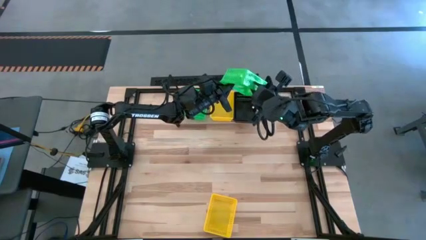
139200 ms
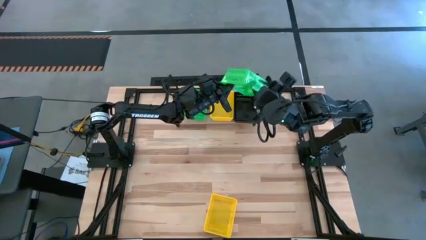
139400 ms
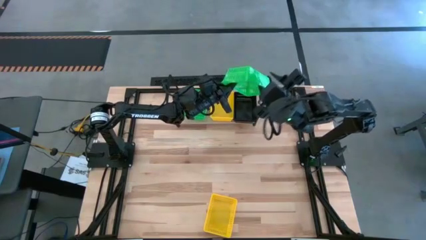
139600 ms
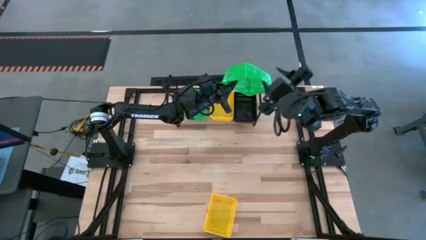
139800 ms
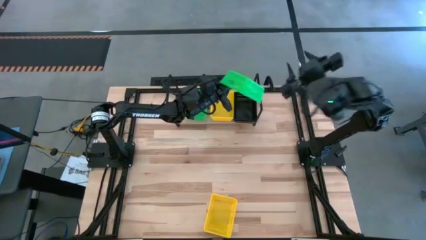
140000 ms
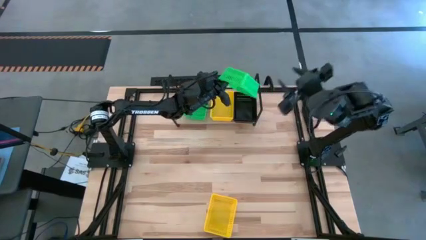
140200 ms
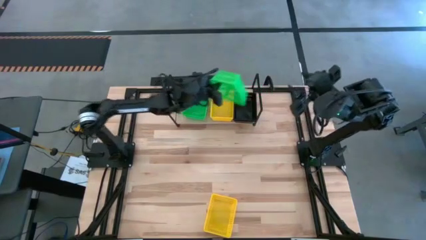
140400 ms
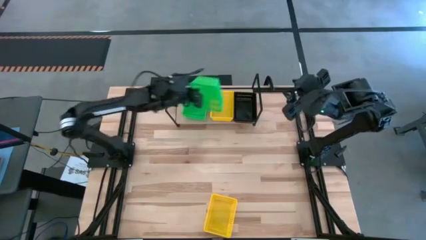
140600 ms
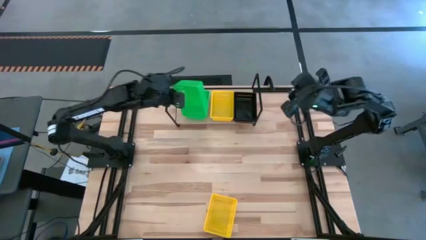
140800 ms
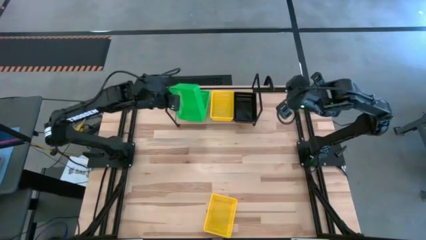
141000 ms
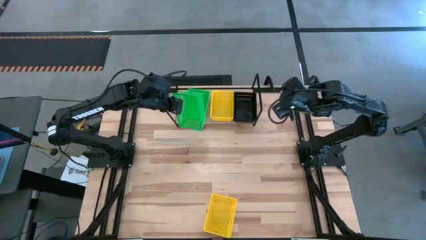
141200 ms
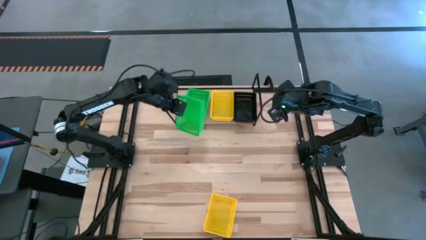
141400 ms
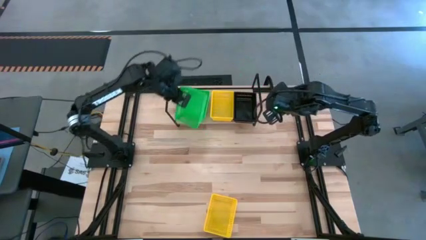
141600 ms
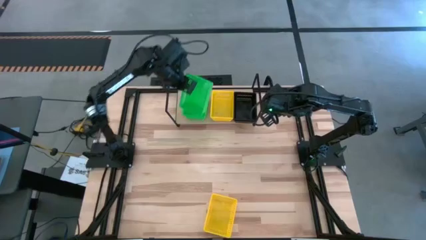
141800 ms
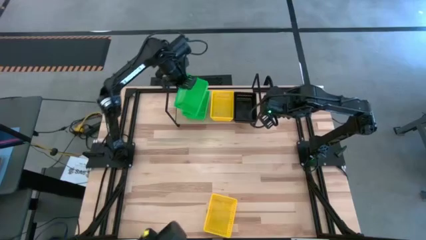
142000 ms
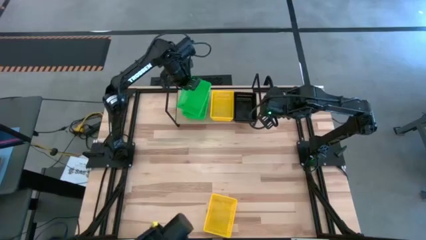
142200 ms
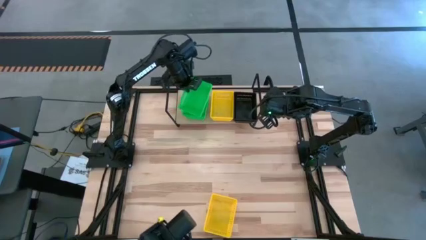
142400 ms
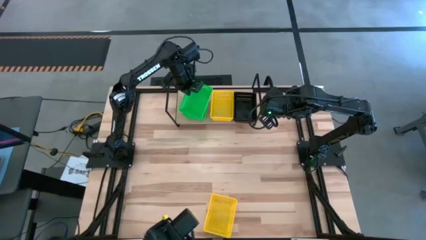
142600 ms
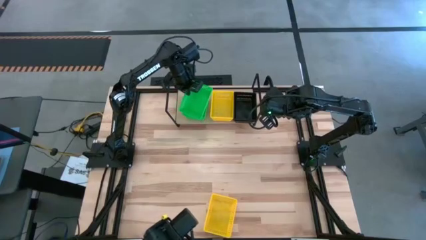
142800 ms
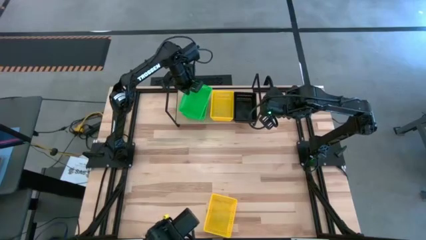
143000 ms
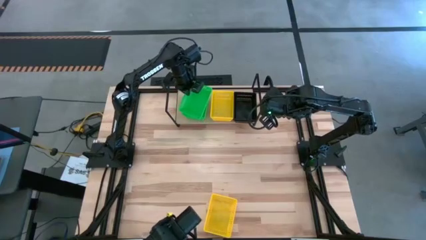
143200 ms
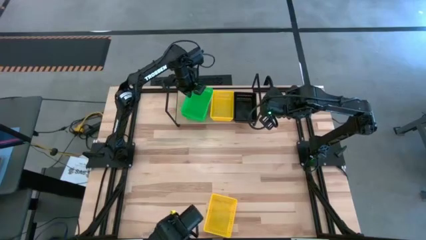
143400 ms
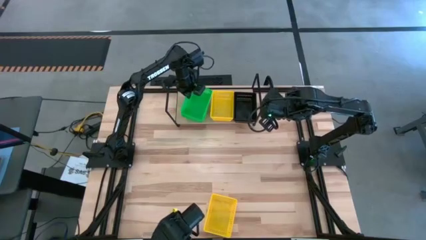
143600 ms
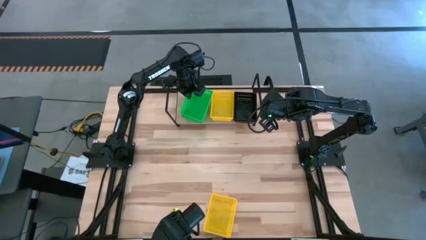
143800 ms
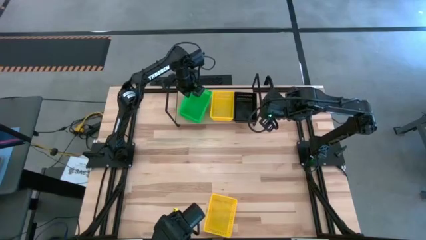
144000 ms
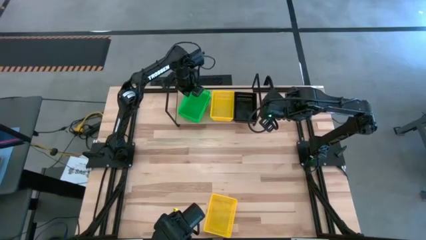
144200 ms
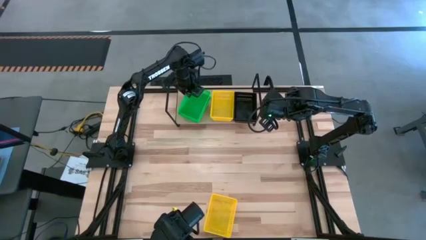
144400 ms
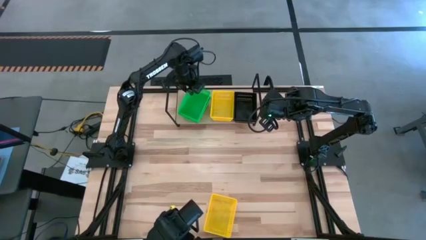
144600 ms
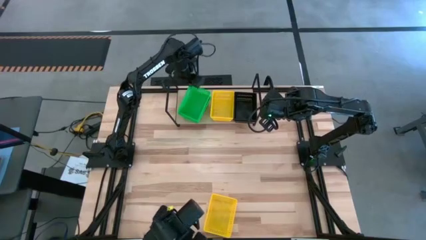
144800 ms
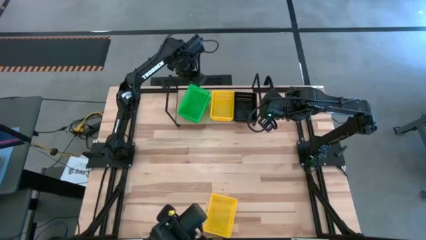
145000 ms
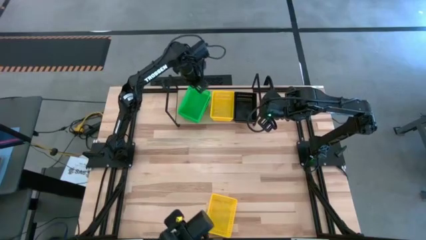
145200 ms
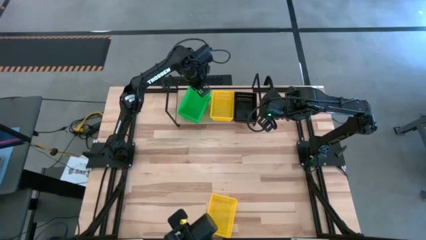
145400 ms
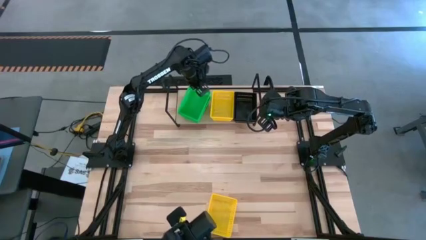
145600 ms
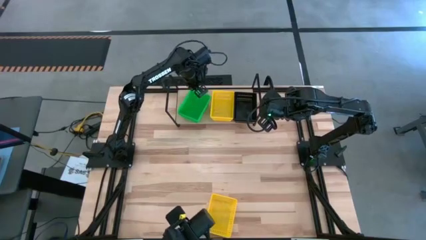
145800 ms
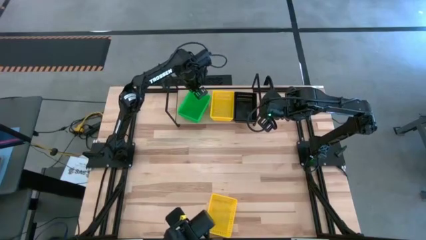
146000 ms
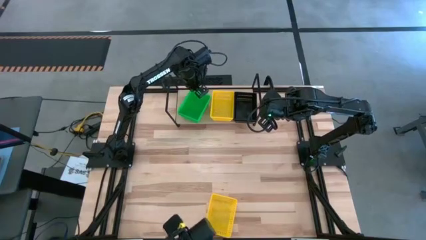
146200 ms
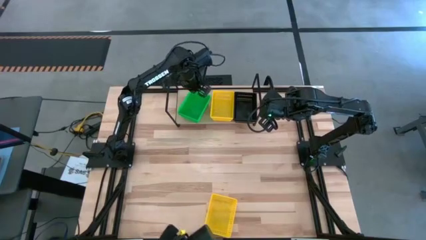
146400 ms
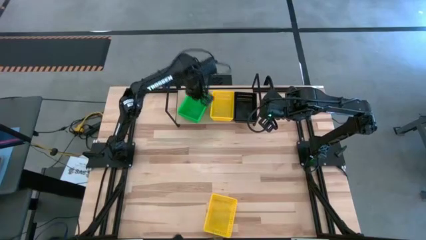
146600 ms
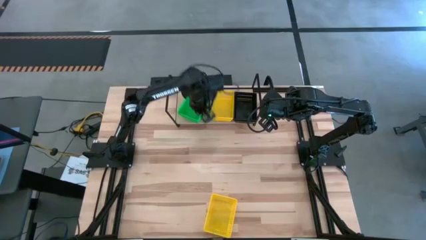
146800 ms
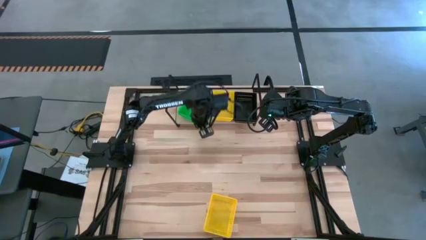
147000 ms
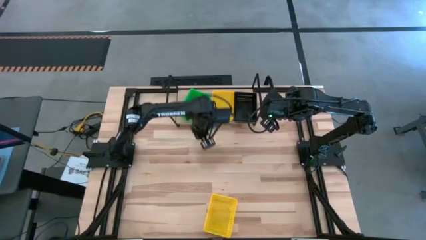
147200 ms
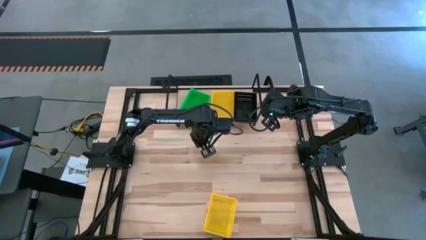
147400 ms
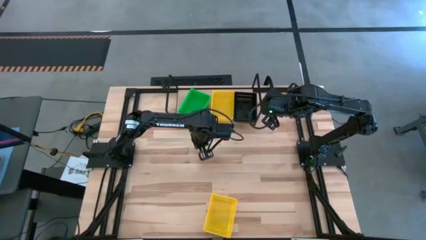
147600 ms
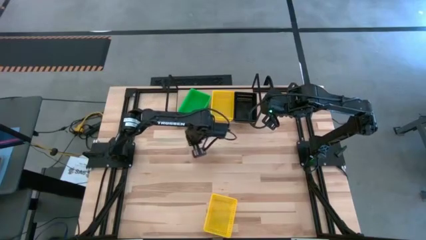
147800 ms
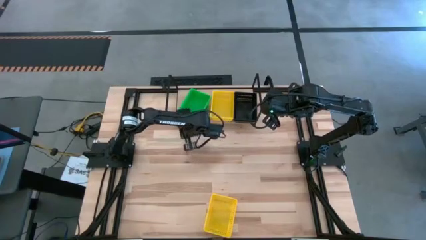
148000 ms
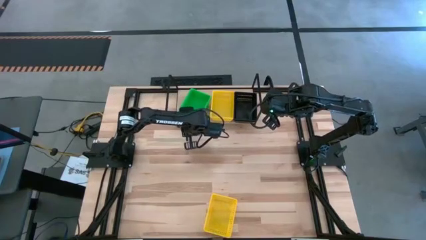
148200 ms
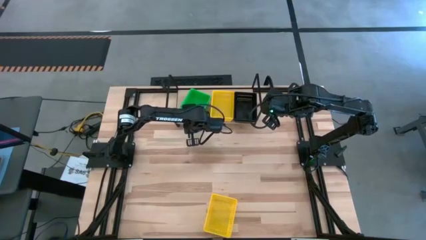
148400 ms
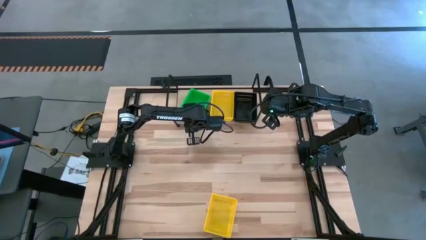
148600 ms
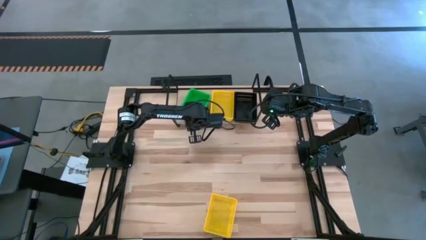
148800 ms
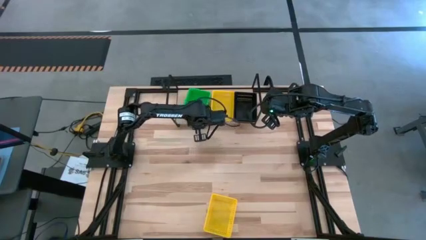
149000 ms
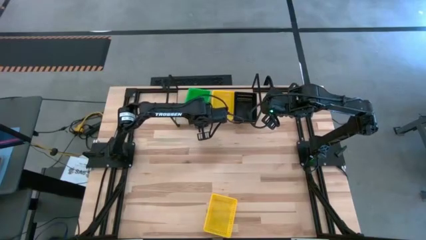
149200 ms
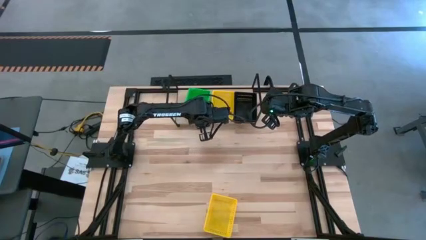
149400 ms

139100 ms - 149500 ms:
Task: Stack baskets on shelf by color
Stack the green bin on the top of the other green bins on the shelf

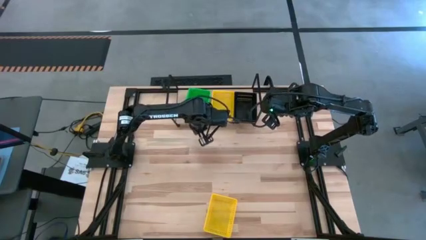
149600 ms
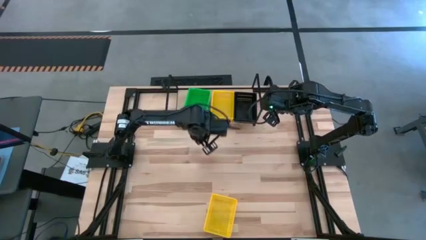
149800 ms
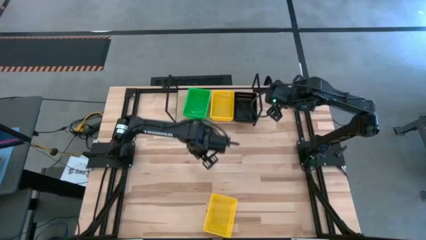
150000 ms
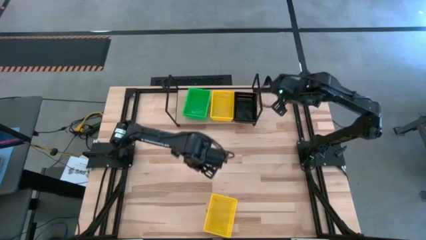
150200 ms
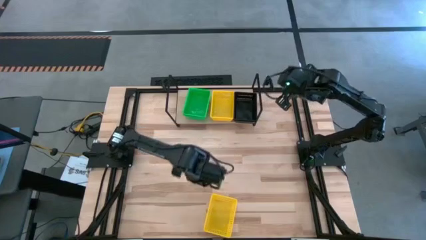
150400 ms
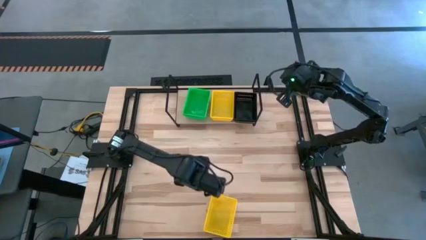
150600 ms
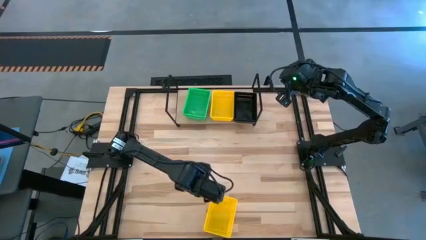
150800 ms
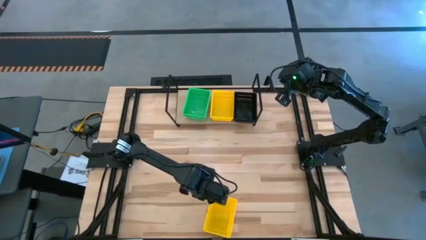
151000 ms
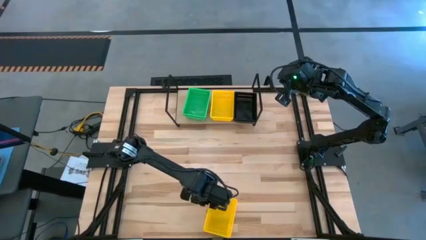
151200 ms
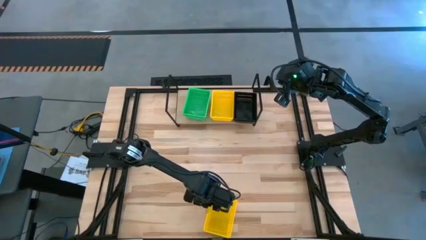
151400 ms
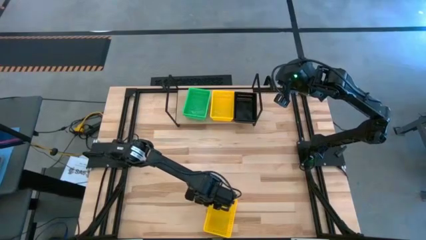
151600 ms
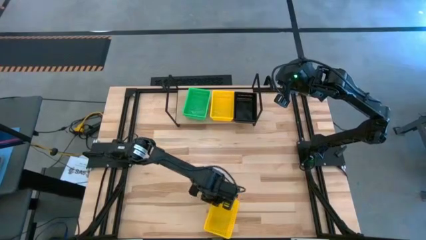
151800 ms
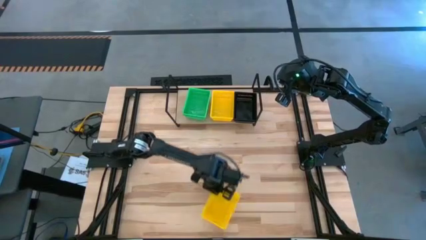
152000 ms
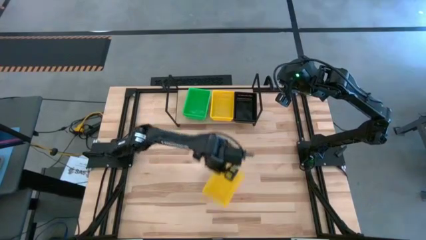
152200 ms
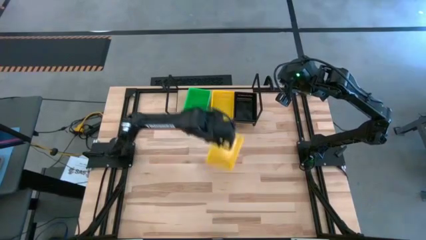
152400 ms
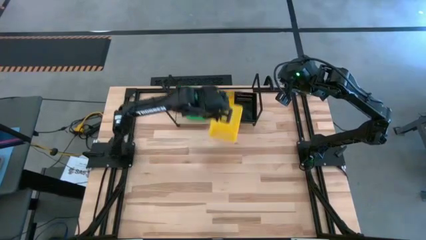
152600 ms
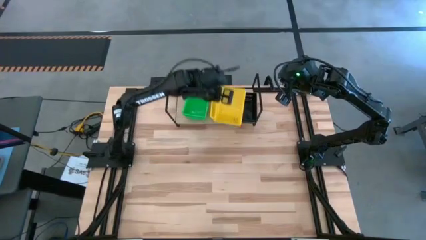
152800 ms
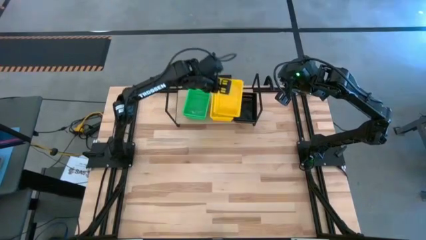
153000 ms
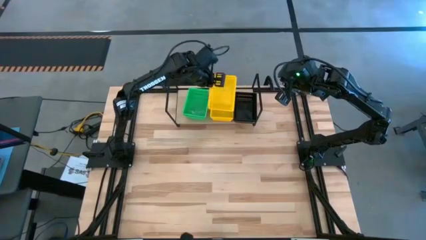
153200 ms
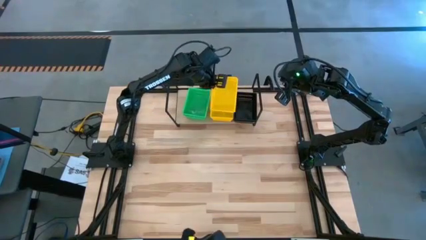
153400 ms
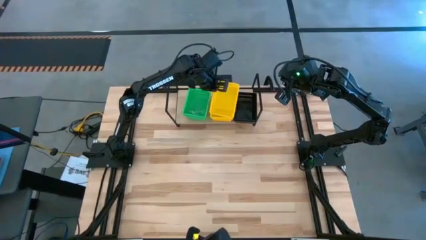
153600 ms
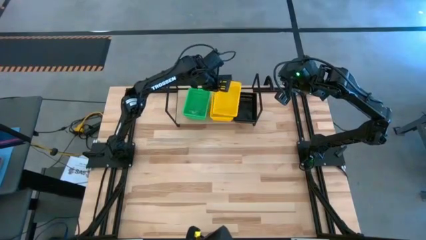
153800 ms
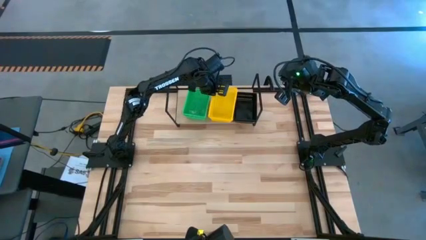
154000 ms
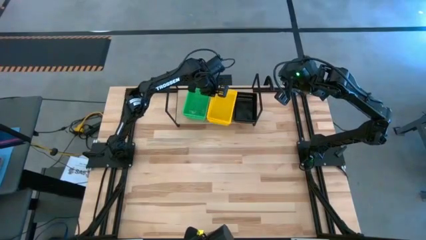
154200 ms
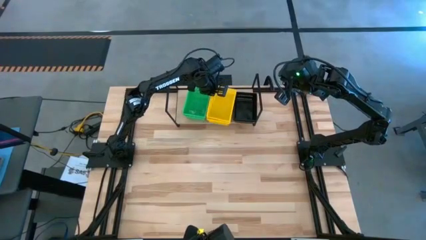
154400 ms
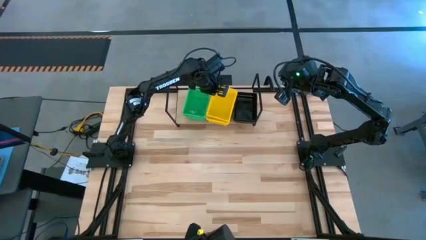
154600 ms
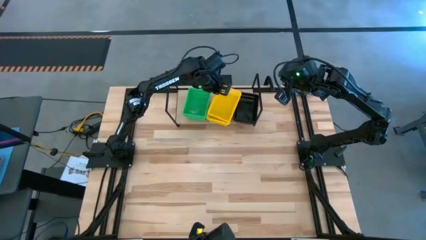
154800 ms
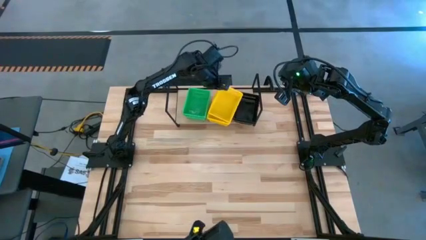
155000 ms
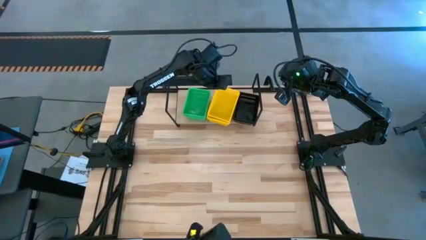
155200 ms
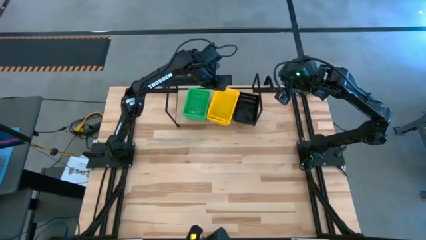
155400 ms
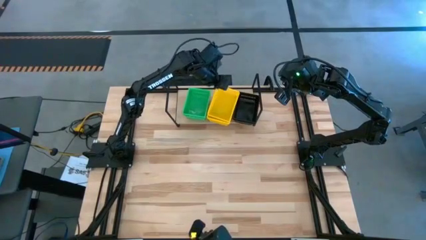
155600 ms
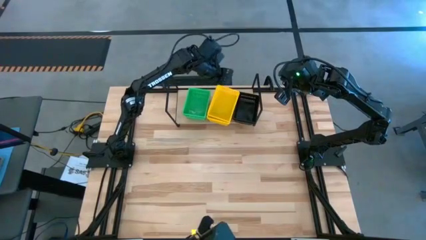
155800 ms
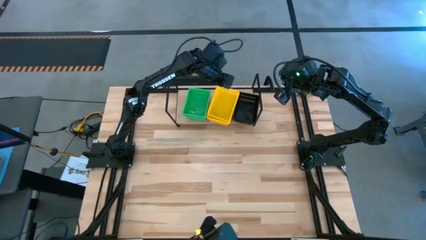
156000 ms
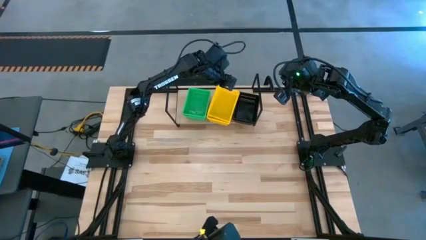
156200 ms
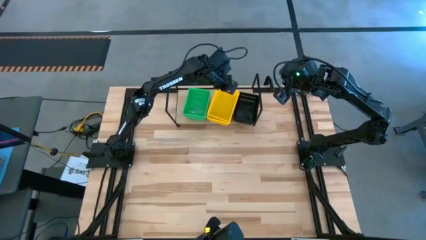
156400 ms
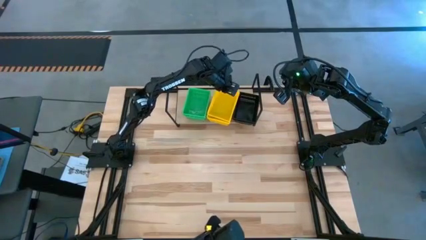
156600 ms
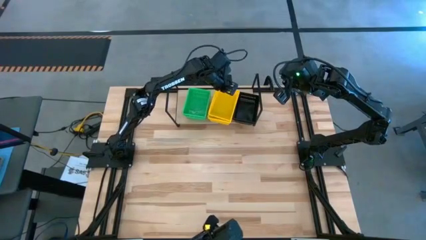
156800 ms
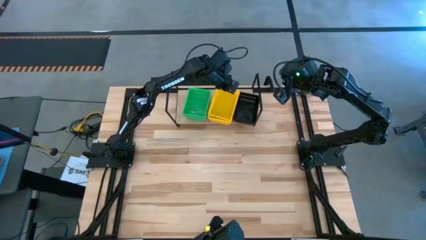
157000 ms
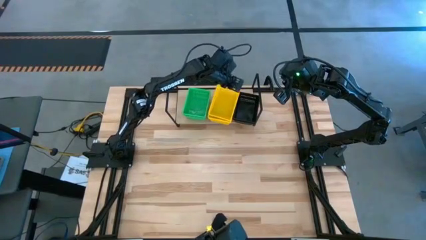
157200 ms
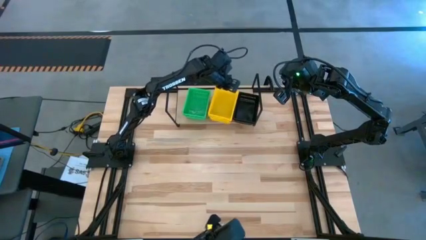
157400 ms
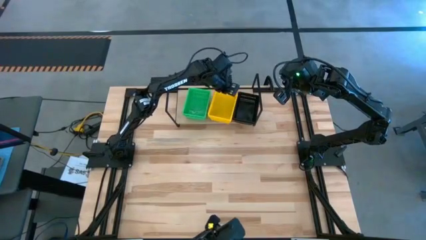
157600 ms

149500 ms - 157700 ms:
Stack the yellow bin on the top of the other yellow bins on the shelf
